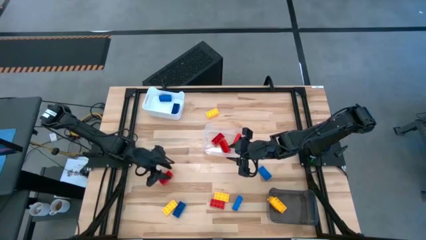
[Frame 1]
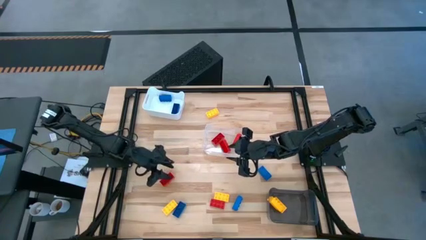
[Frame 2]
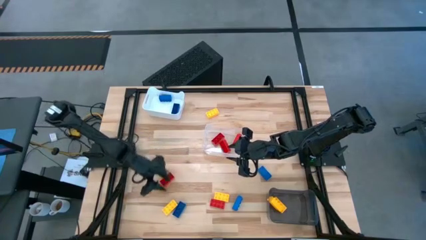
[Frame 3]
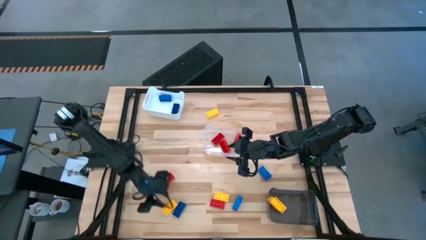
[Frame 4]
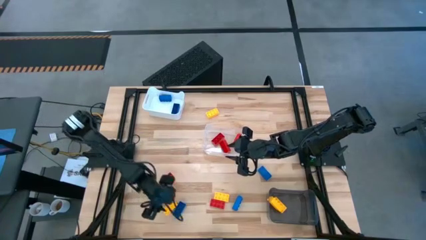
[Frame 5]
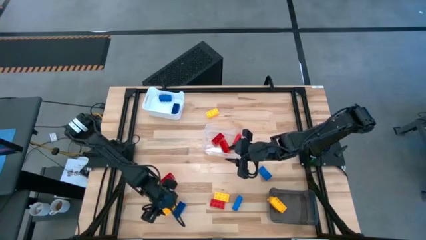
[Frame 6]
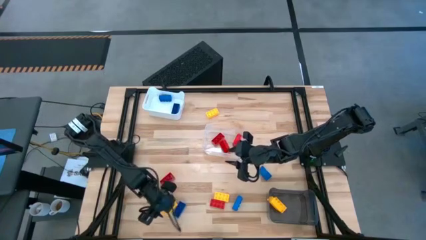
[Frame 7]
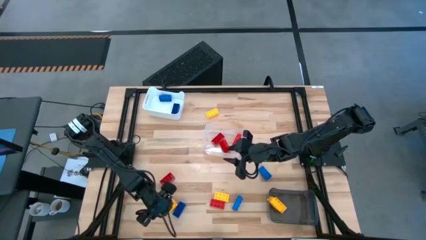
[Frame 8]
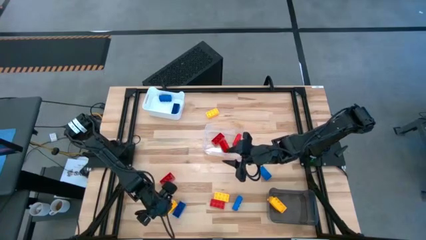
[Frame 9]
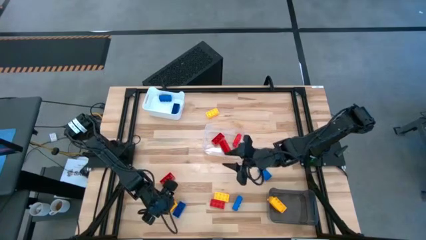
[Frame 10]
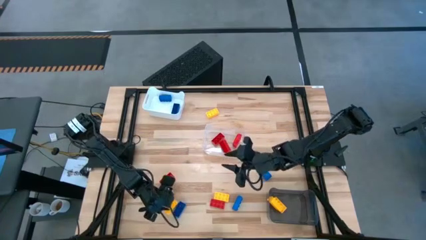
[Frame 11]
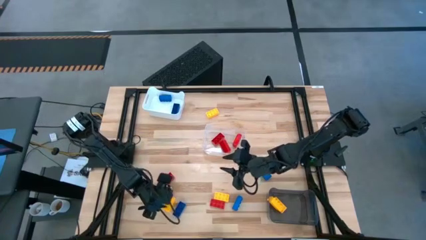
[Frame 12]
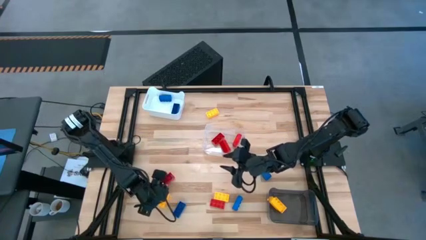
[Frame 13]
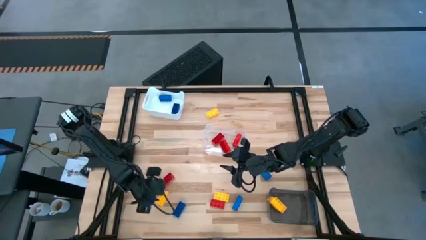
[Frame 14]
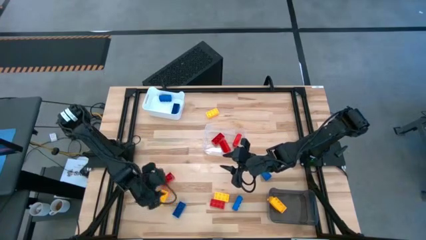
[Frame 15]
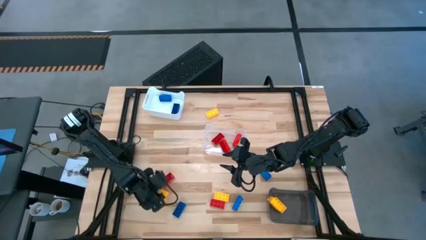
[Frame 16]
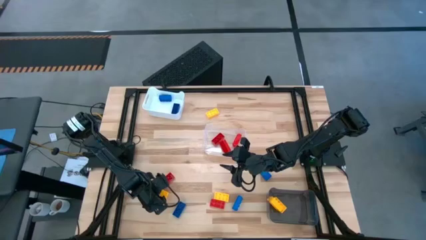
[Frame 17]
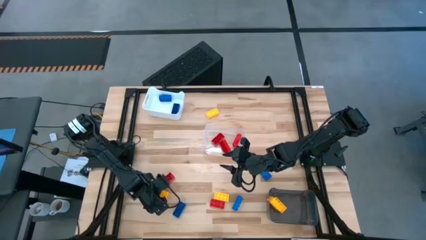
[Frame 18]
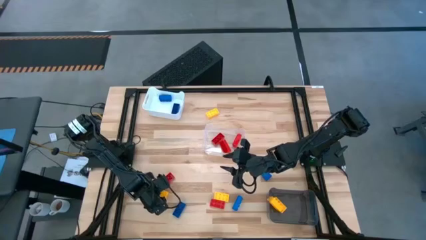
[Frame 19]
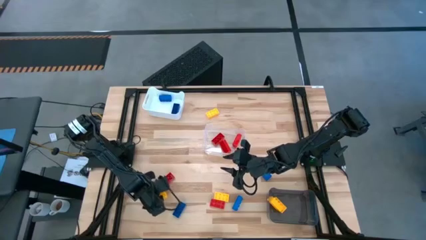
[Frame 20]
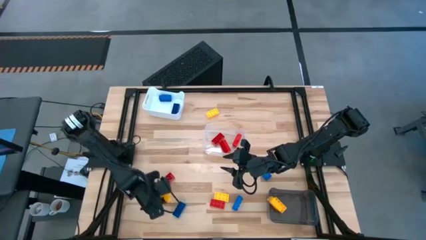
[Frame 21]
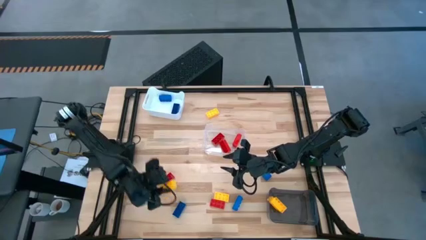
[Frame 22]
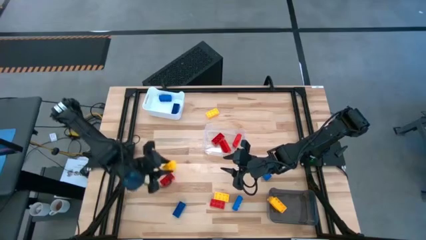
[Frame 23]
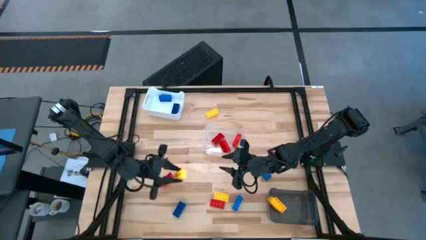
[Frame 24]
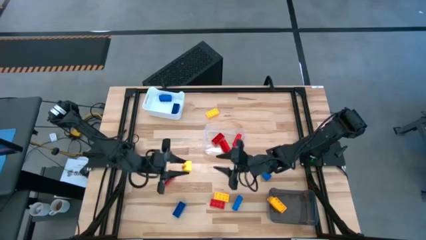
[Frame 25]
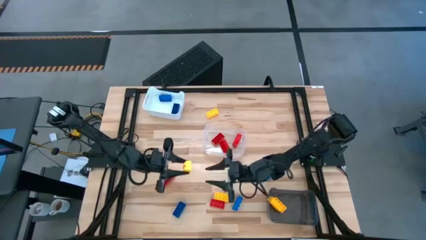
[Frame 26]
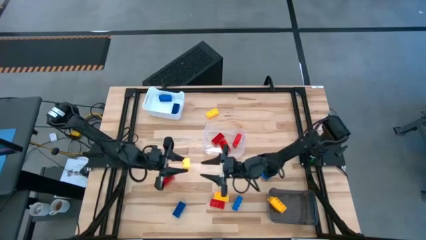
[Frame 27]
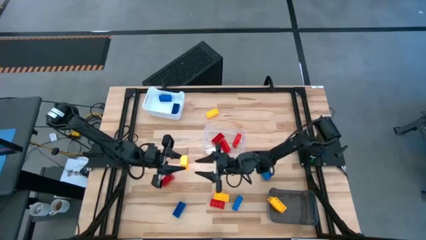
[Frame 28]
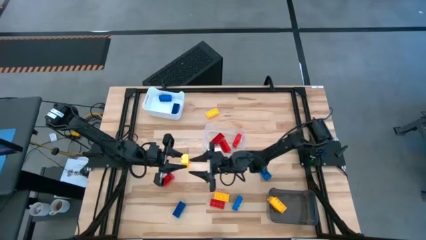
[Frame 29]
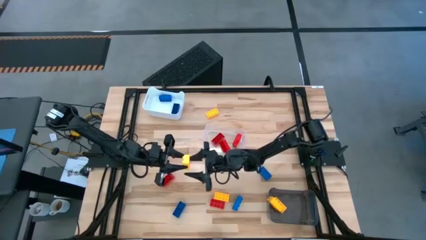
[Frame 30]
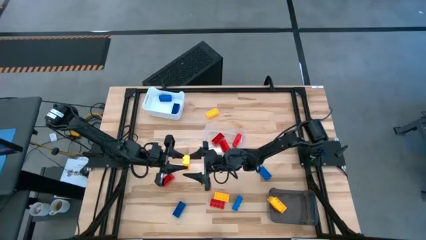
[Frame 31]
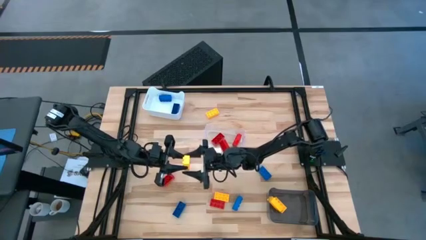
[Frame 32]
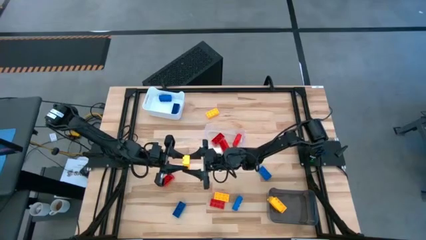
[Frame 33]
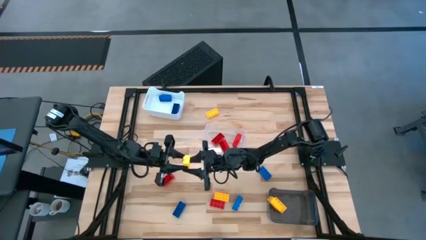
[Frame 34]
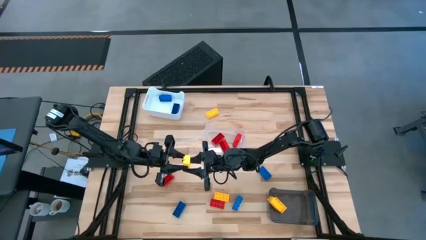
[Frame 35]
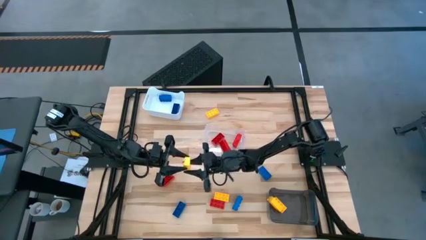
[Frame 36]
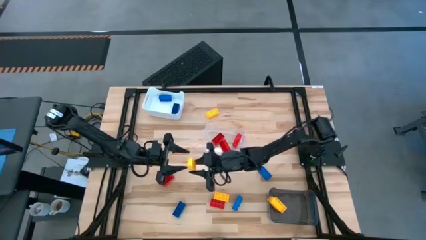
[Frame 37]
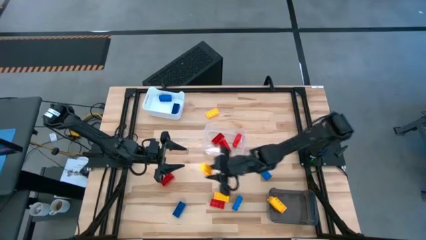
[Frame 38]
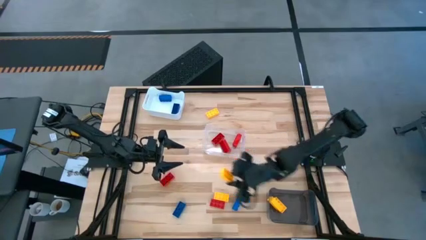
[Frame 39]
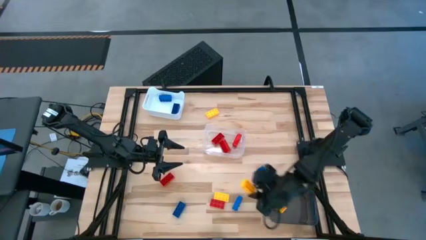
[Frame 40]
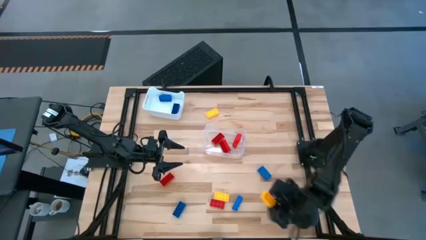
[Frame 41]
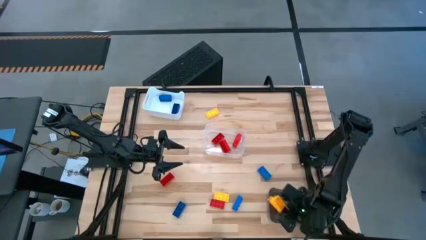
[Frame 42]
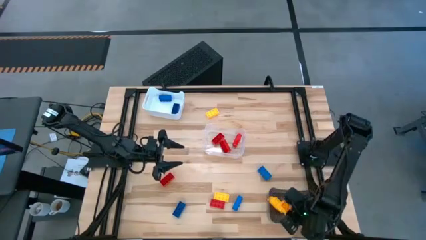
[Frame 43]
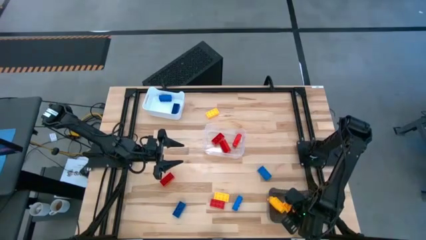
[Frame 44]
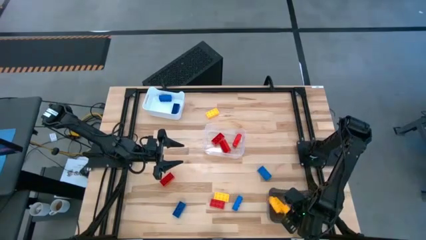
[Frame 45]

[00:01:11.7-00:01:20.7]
Task: Sort & place blocks by color
Put the yellow game piece into the black bin

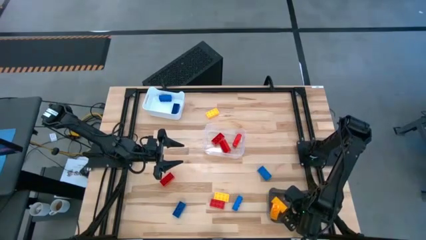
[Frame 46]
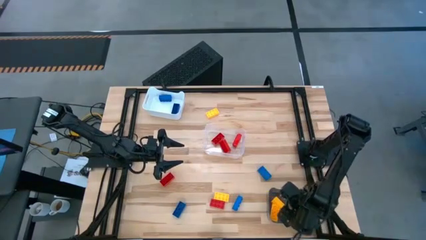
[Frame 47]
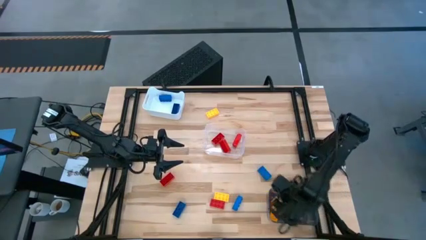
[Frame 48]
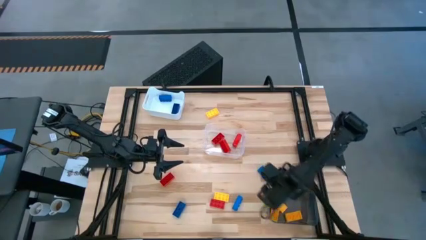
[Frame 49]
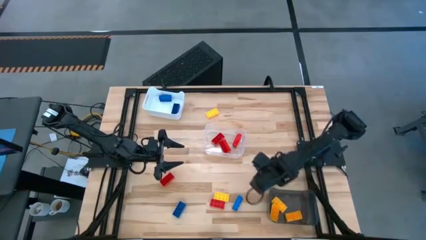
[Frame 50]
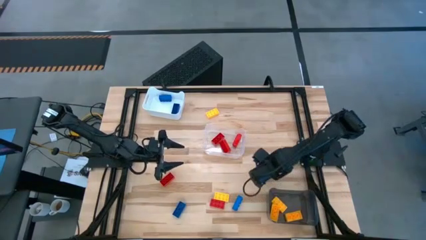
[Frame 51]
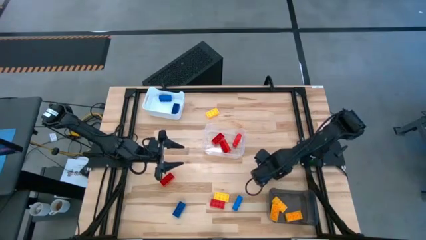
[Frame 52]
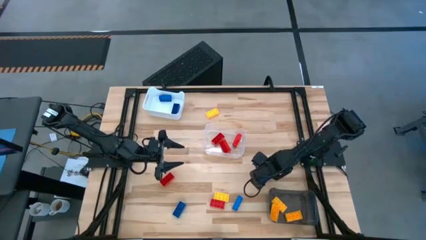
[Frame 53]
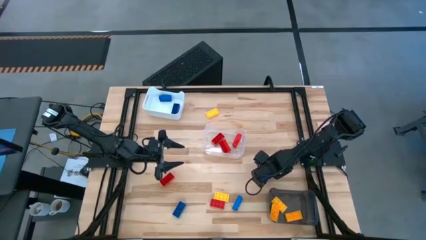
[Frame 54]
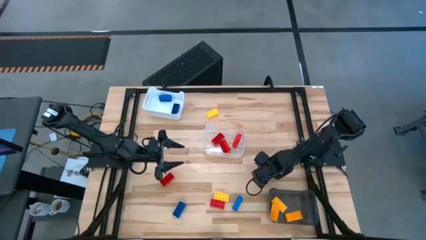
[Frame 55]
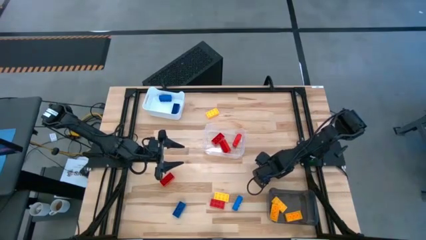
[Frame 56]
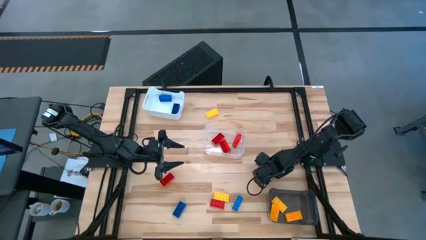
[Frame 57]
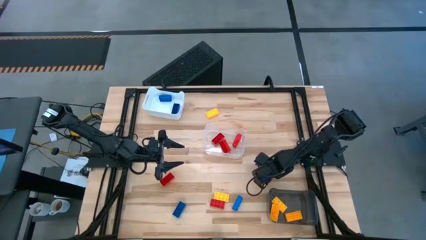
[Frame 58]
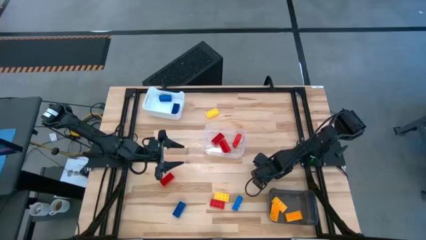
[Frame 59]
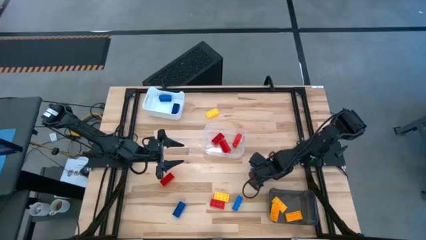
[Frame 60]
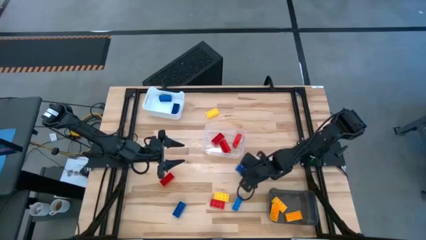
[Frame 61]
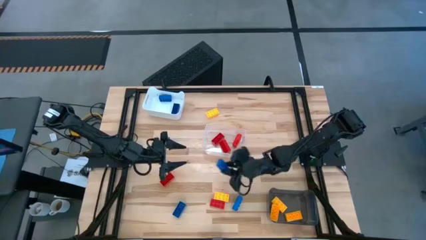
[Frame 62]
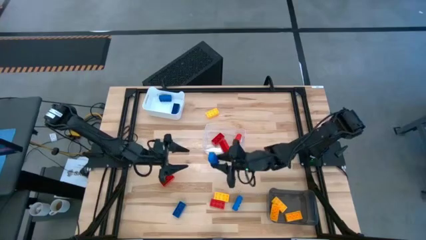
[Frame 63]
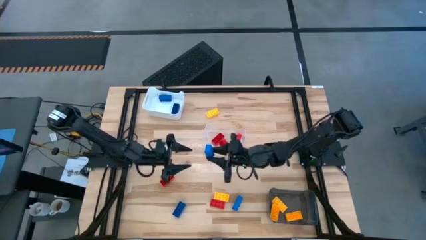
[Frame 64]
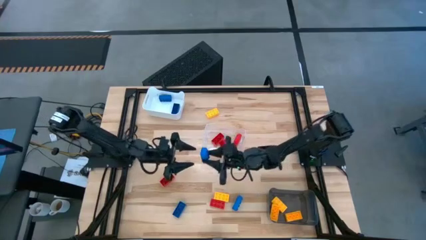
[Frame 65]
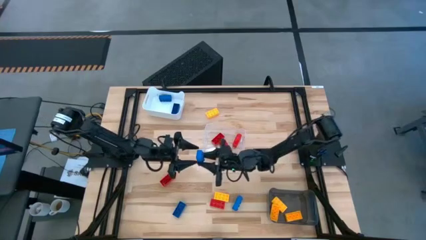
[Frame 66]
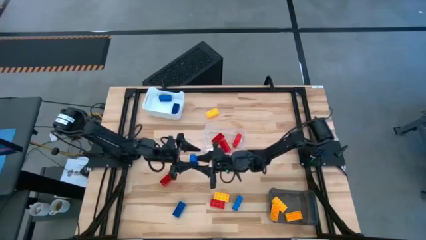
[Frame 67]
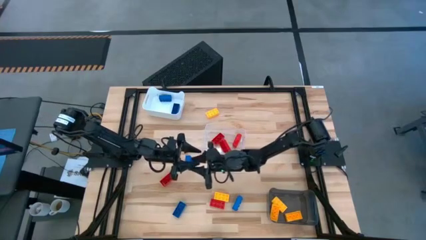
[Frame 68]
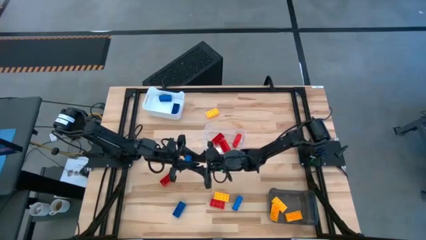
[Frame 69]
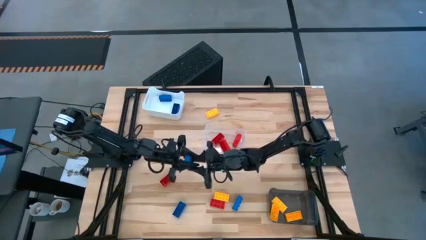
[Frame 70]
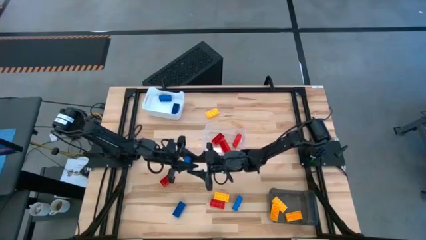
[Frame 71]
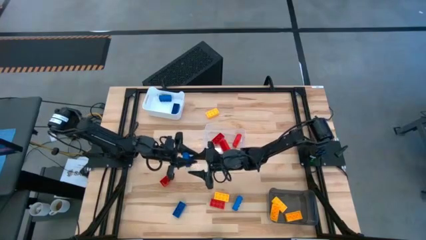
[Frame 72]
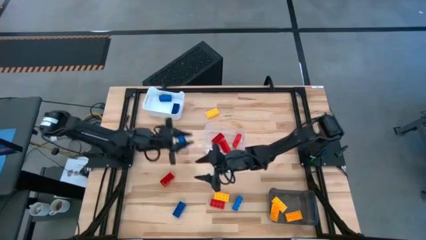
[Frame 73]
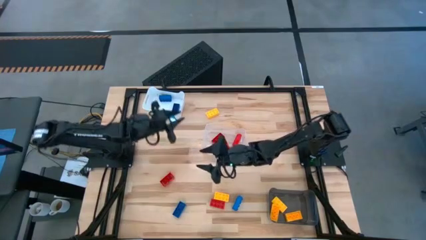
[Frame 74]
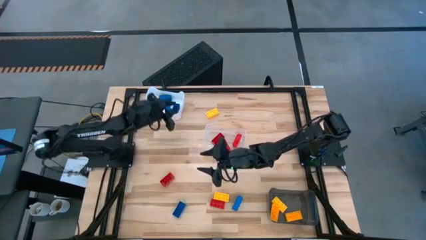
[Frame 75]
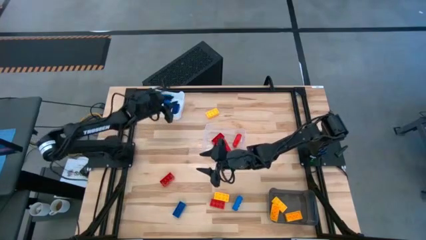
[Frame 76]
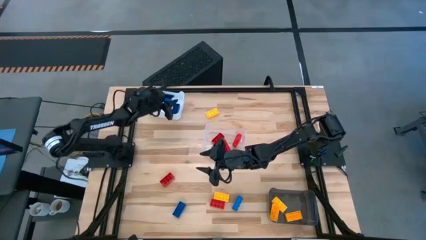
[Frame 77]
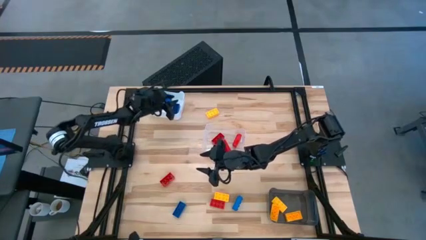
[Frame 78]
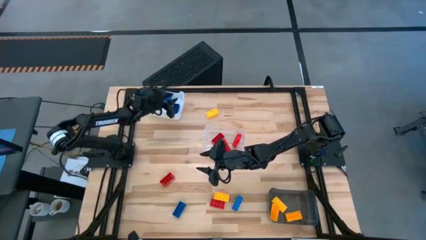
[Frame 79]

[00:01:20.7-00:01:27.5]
Put the blue game piece into the white bin
